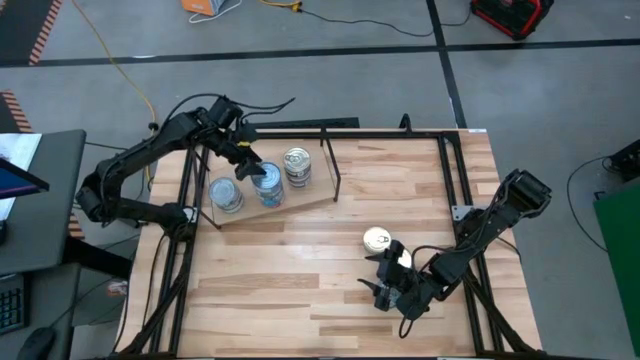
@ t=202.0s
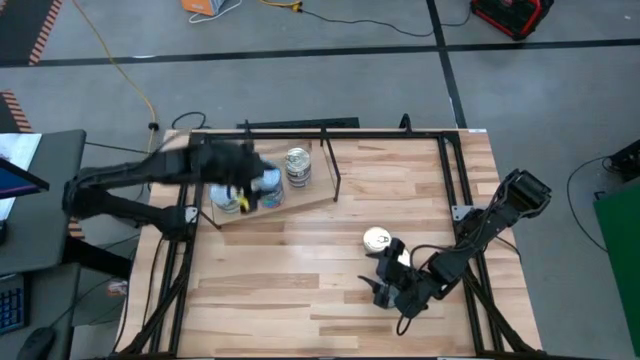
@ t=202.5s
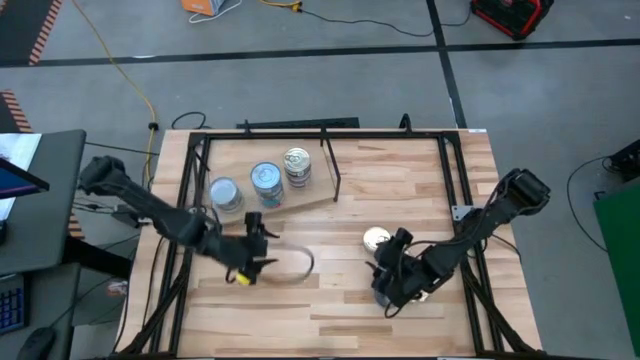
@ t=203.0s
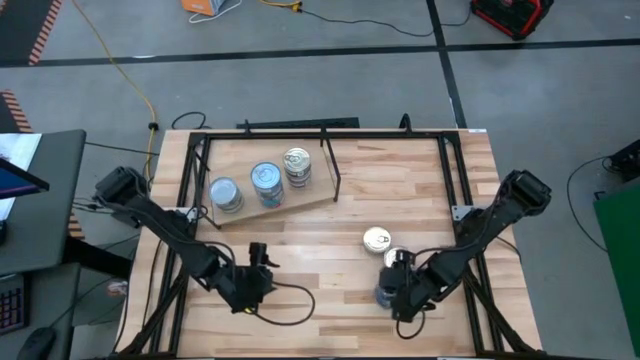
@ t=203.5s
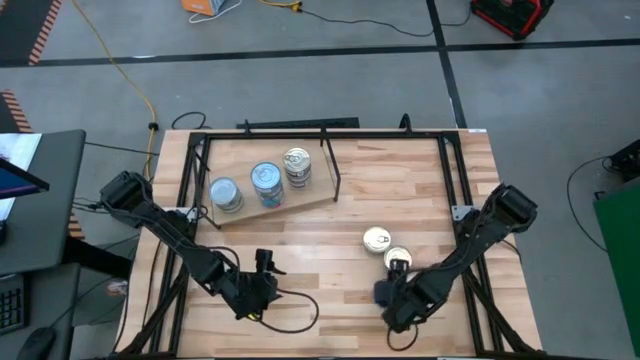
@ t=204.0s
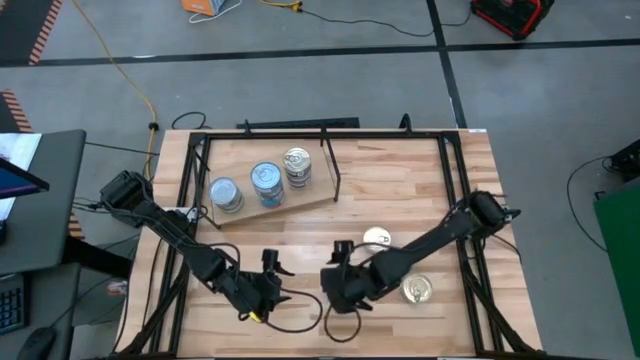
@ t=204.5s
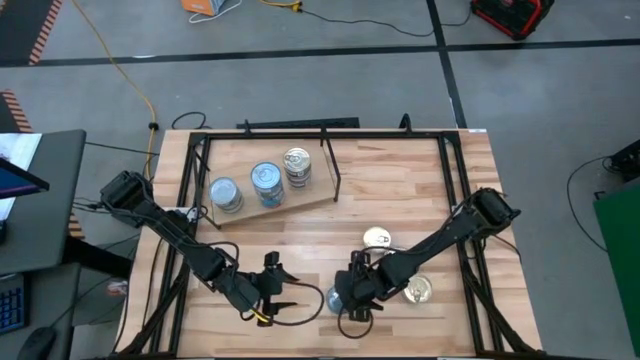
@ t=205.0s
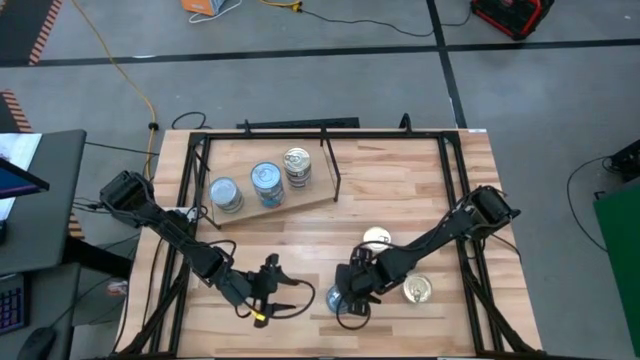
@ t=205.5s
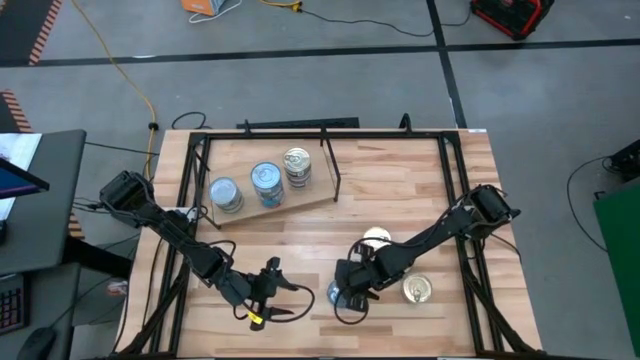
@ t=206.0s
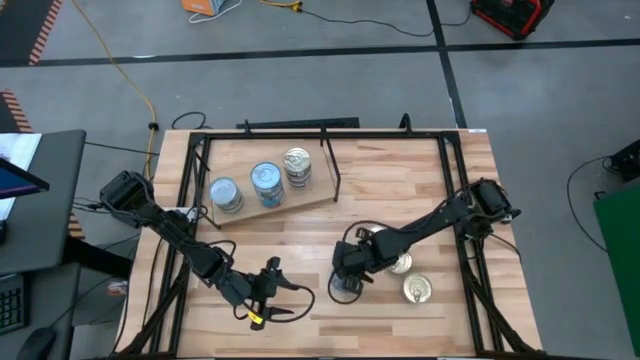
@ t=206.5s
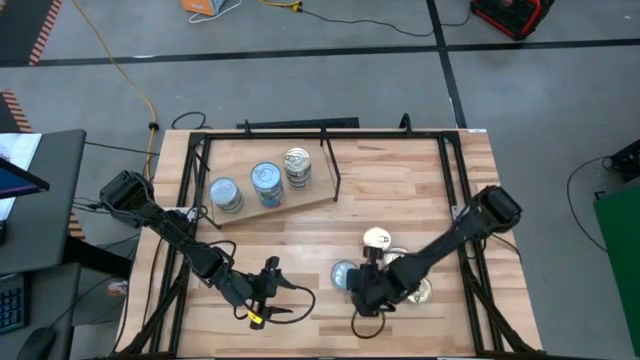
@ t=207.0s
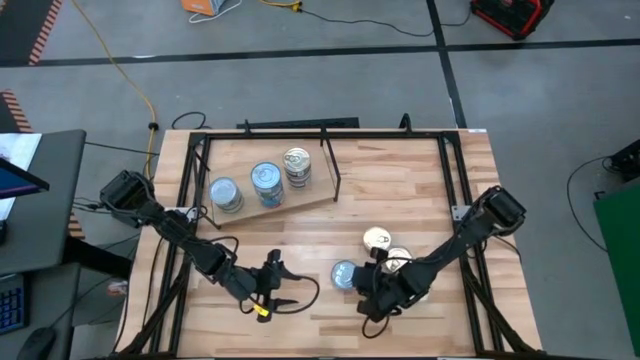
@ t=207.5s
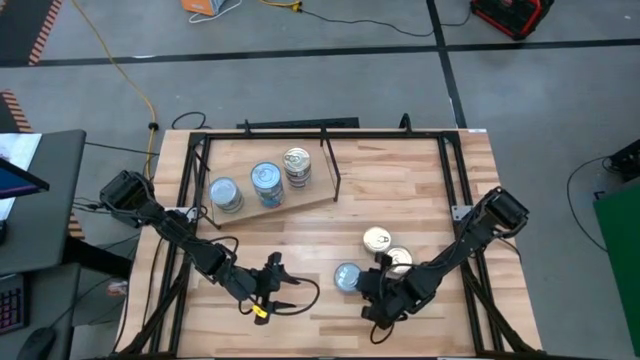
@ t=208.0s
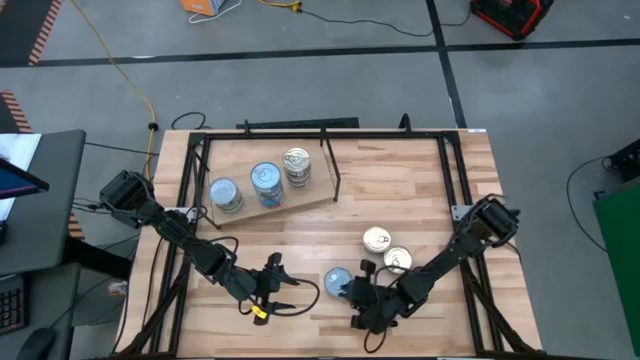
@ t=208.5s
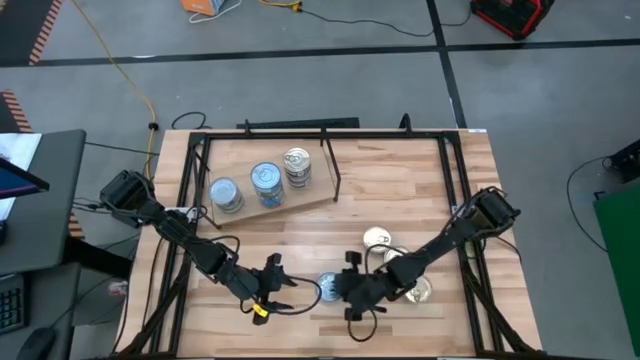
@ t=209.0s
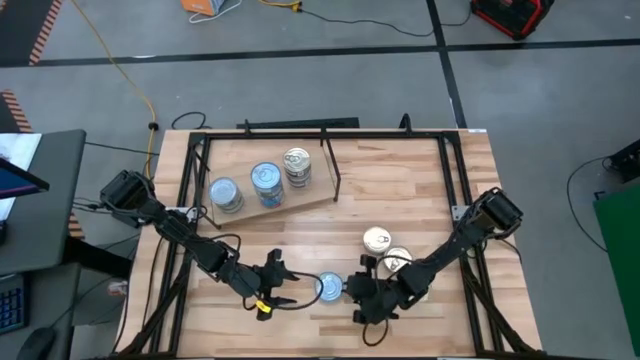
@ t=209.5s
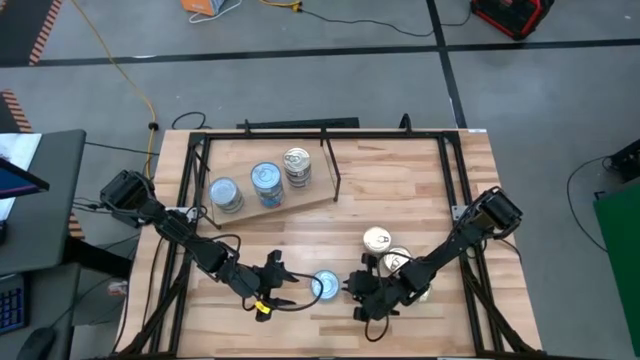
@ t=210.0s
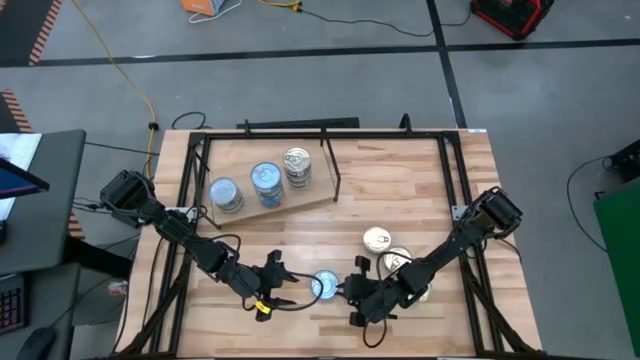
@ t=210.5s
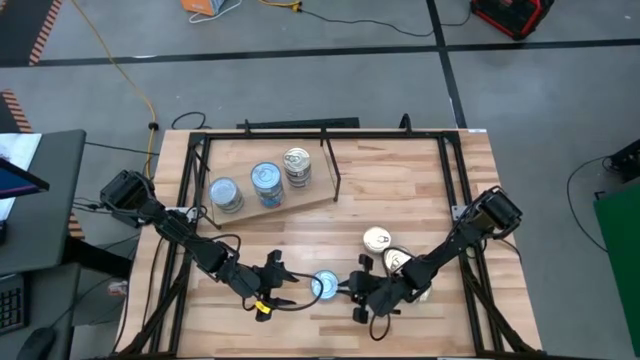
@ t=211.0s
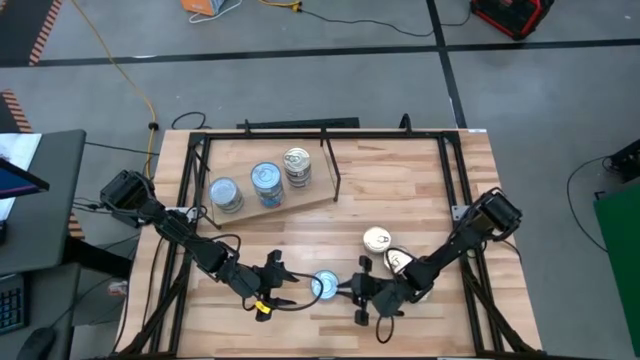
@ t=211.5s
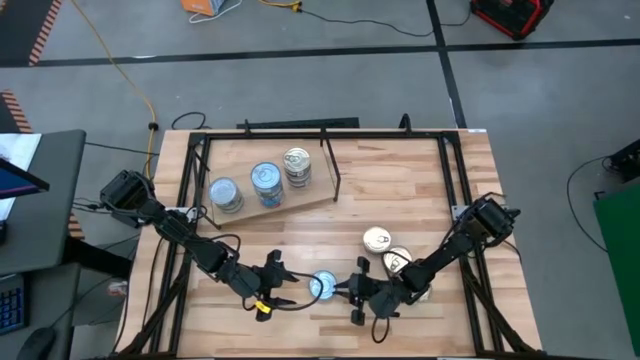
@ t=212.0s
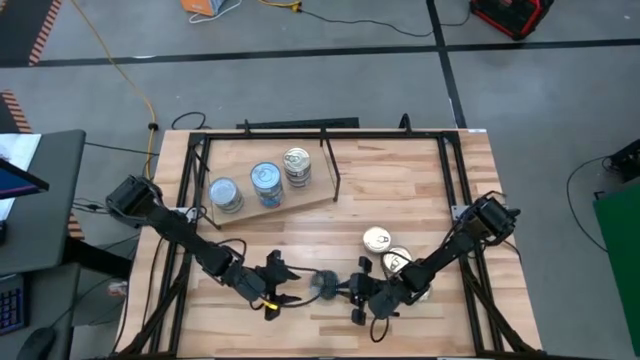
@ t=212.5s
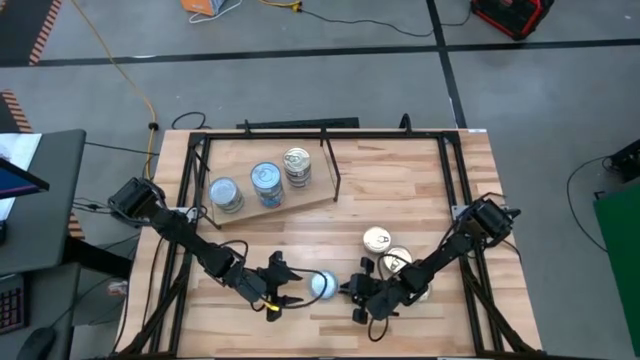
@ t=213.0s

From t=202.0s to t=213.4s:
Task: Stack canned seafood by type on shelf
Stack the blue tuna can on top of the blue tuna can on the shelf

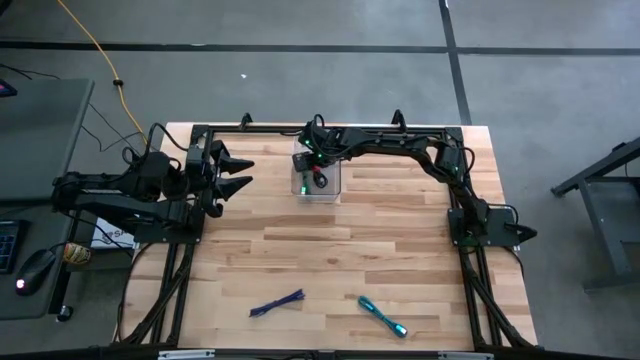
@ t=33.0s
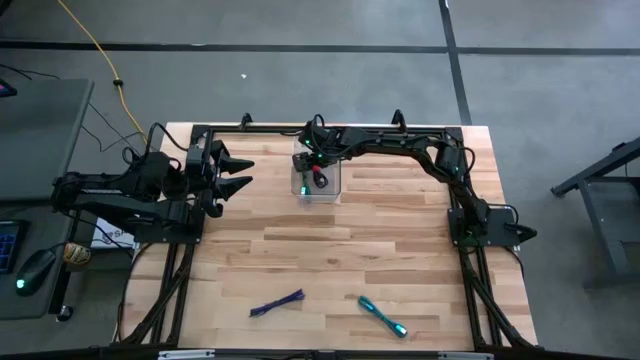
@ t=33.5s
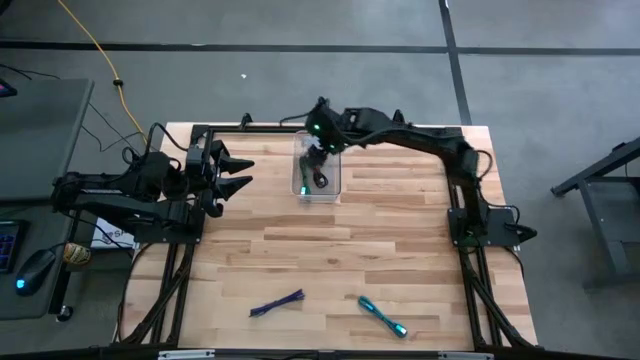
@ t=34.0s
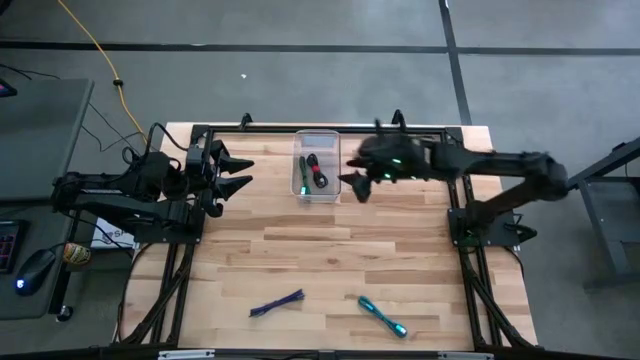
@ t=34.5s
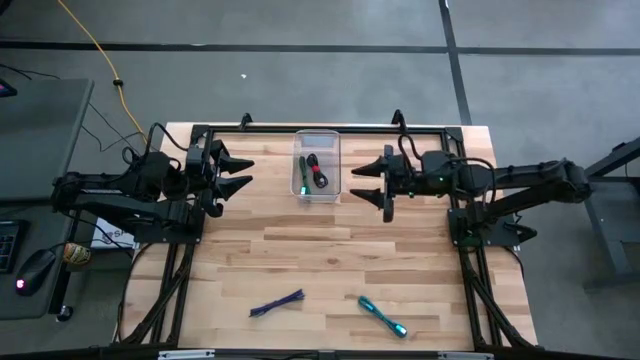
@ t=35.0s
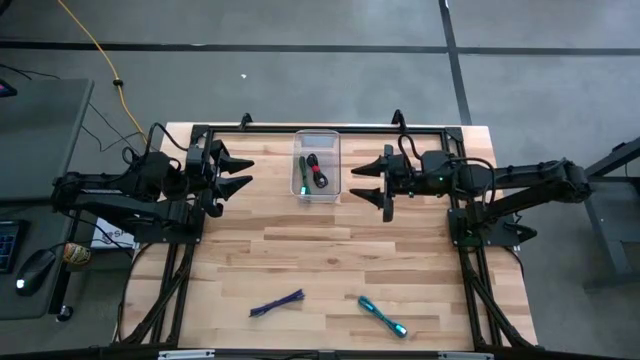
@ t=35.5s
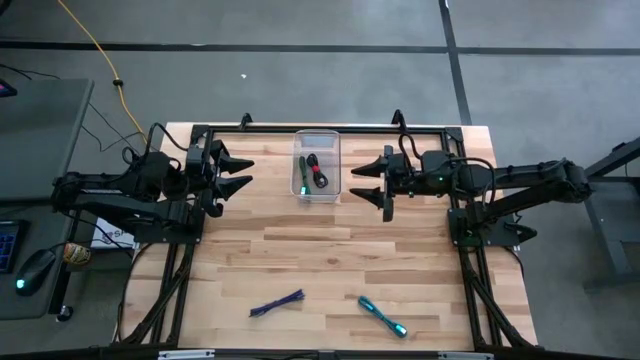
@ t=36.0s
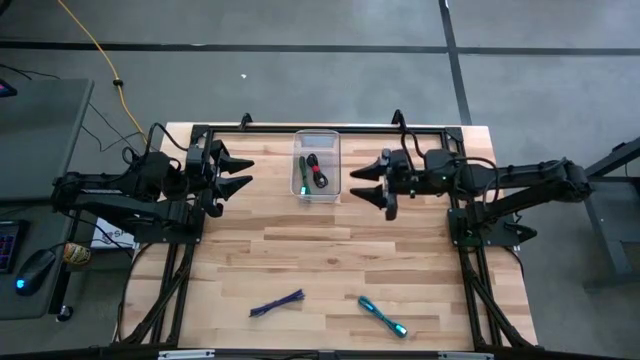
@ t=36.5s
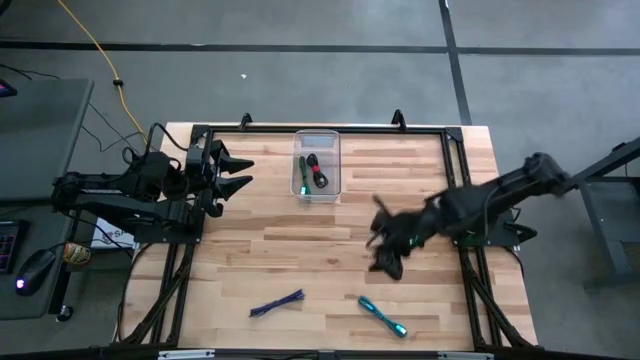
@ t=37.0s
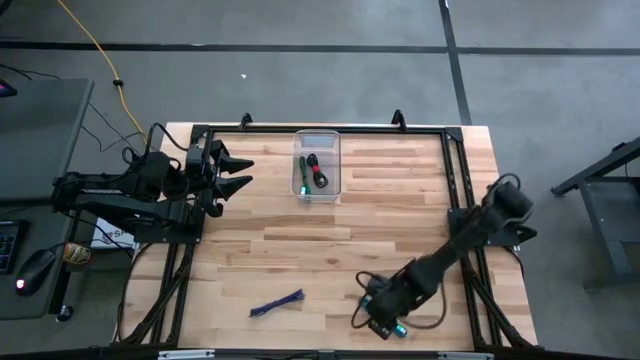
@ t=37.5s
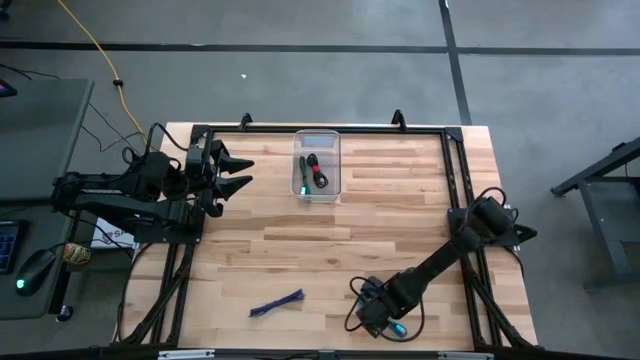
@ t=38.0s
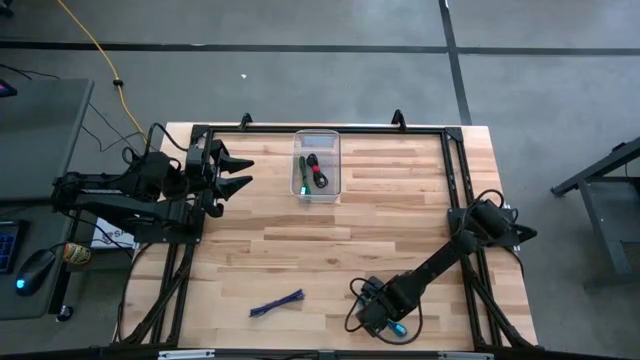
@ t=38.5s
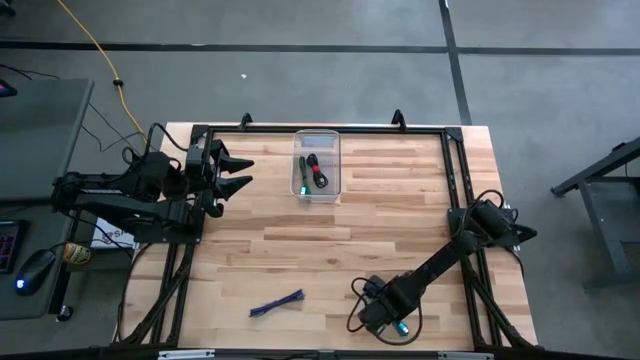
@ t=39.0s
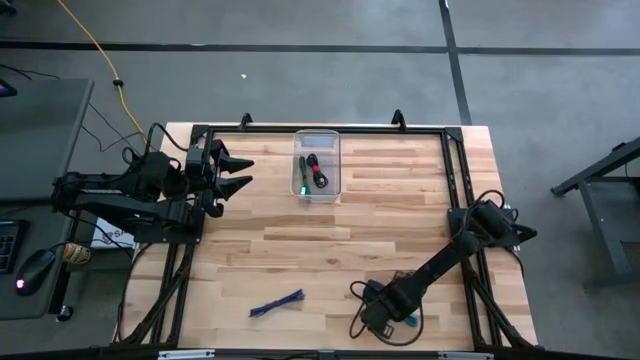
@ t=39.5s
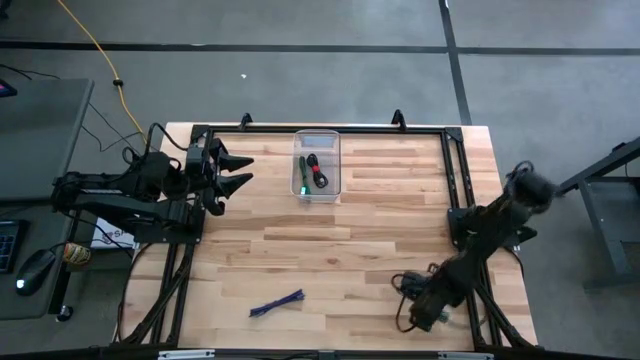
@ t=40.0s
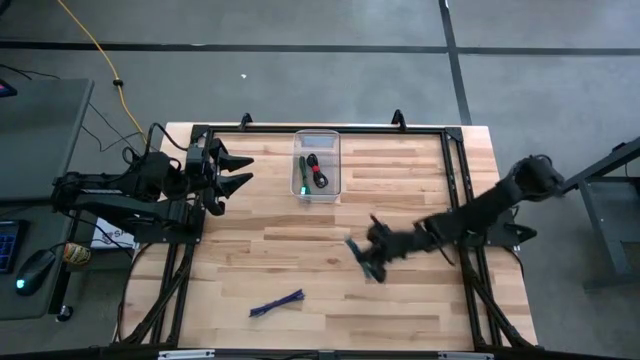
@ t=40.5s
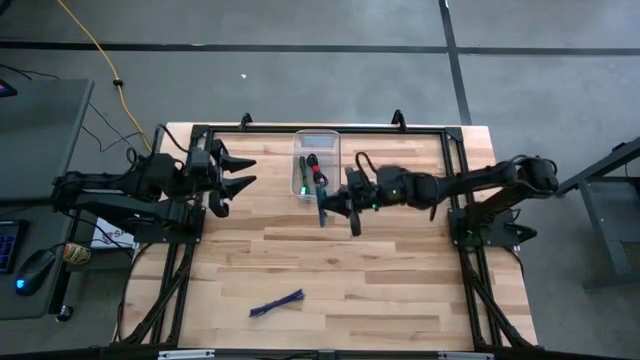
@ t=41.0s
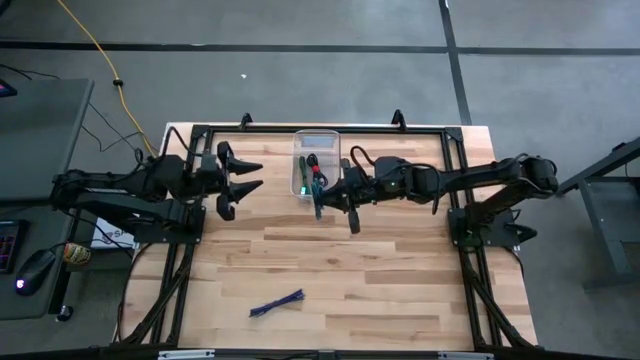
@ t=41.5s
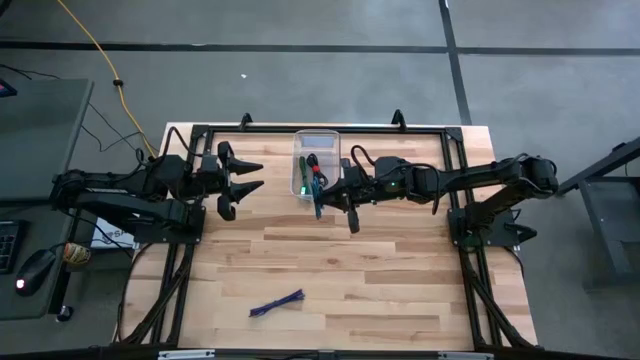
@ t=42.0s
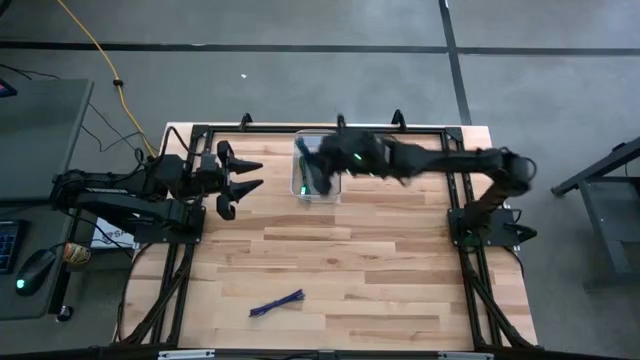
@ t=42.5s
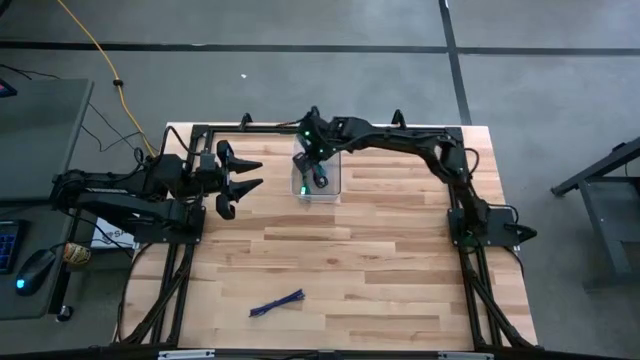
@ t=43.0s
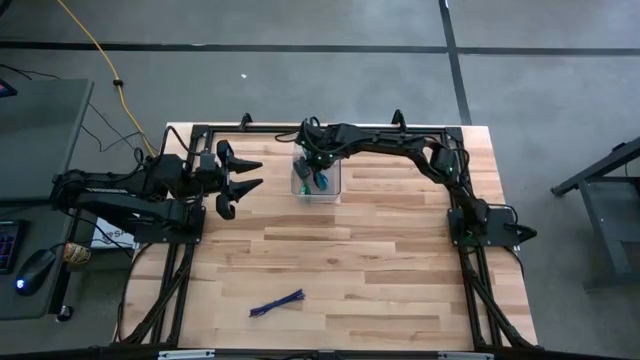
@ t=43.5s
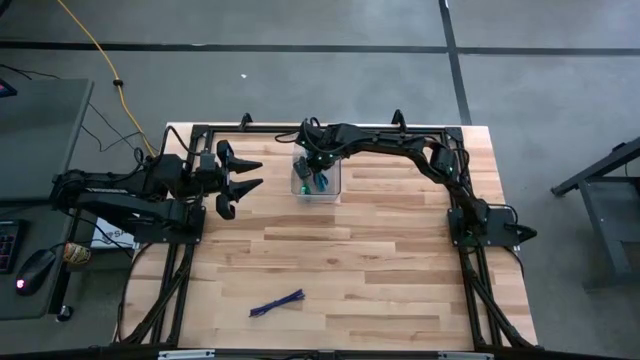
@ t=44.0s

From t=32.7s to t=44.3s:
Task: Pick and place USB-C Cables
Put the blue charger cable into the transparent bin
